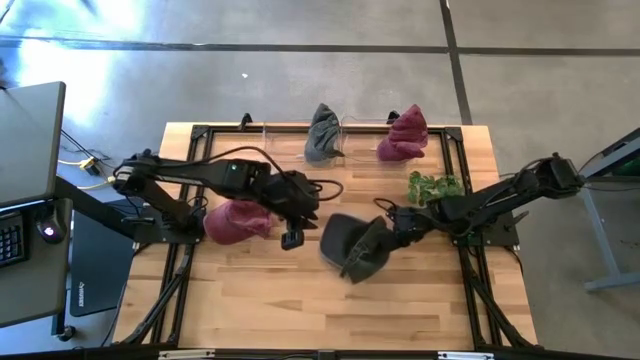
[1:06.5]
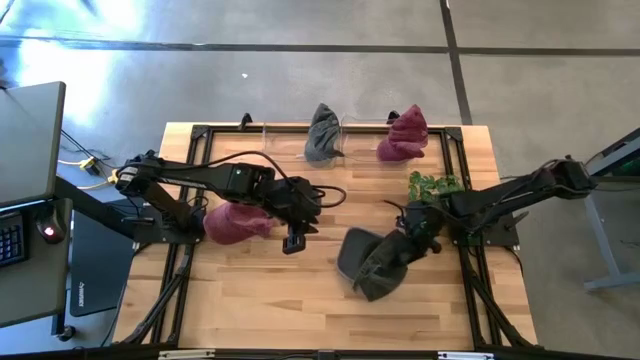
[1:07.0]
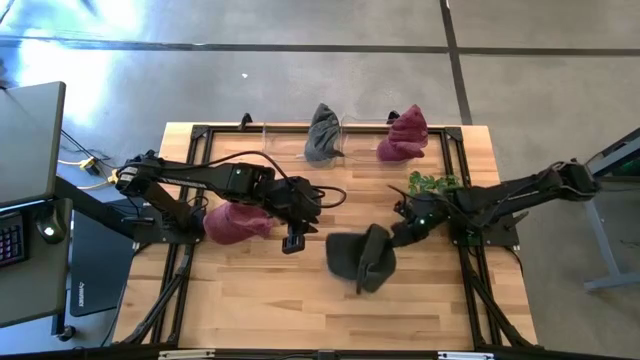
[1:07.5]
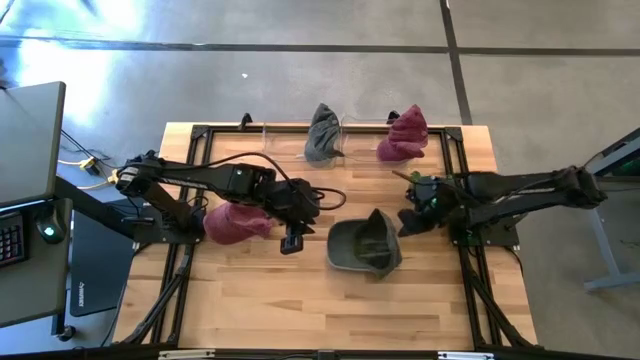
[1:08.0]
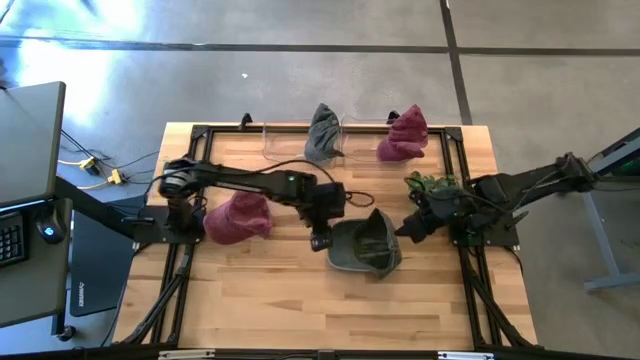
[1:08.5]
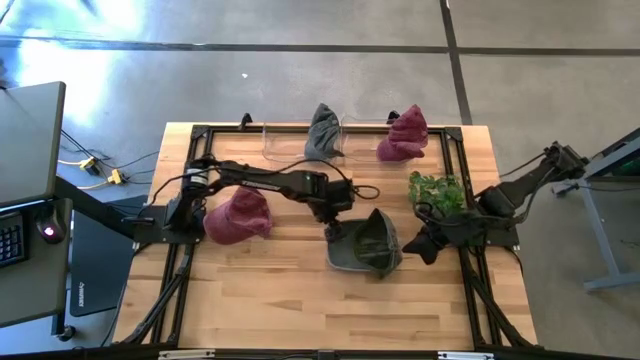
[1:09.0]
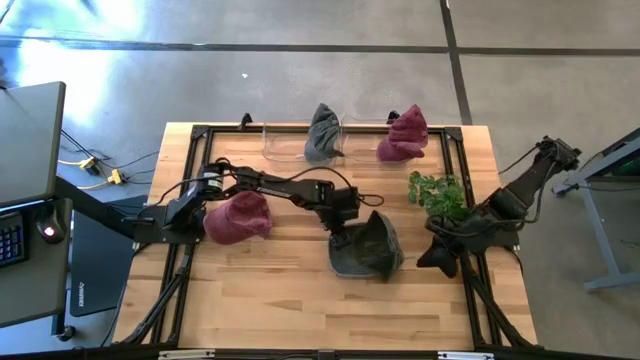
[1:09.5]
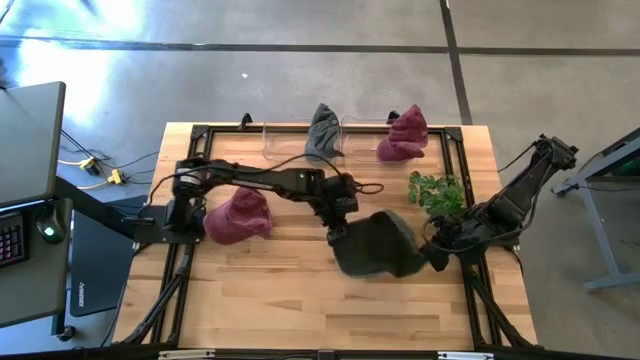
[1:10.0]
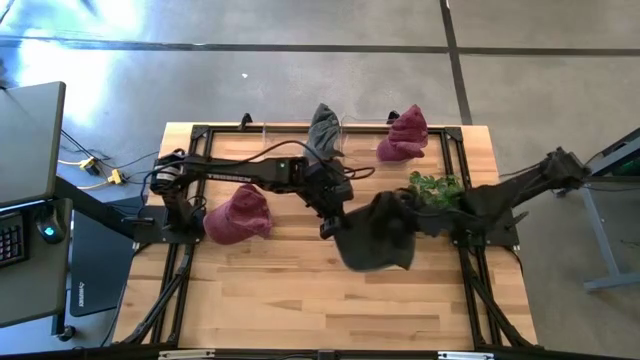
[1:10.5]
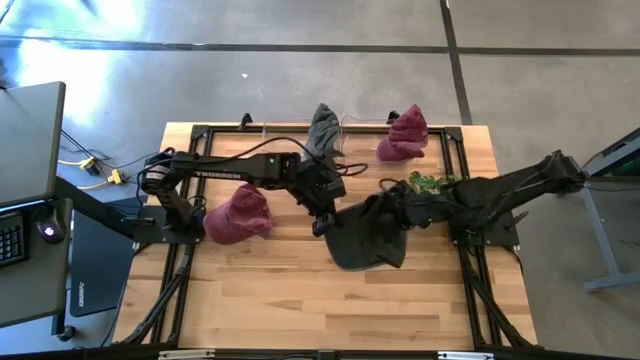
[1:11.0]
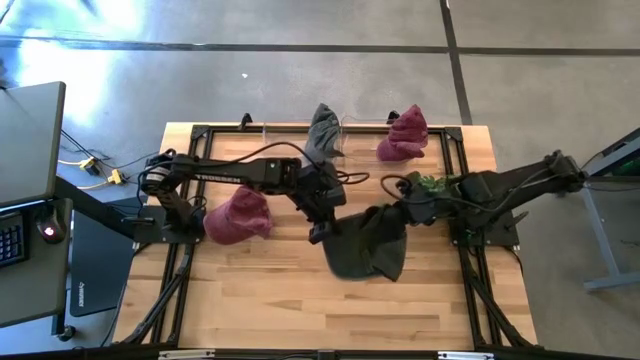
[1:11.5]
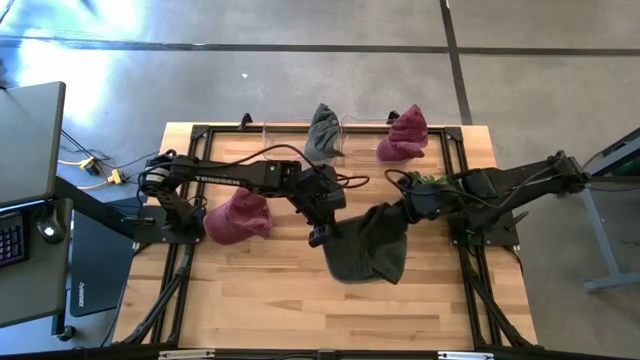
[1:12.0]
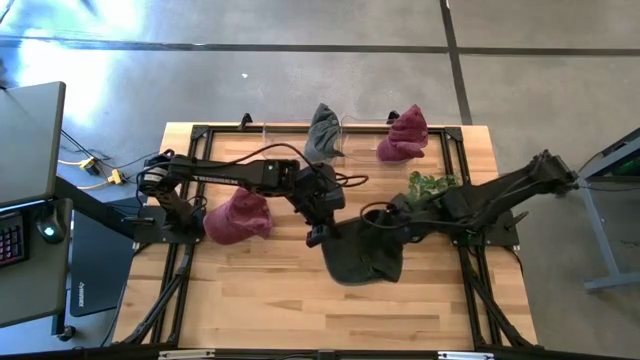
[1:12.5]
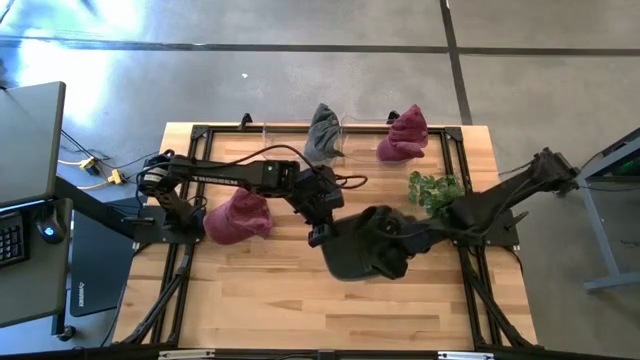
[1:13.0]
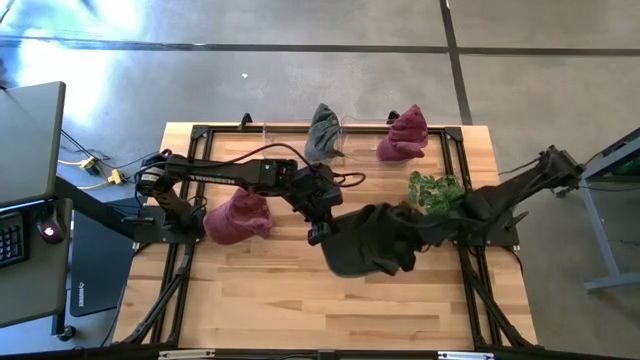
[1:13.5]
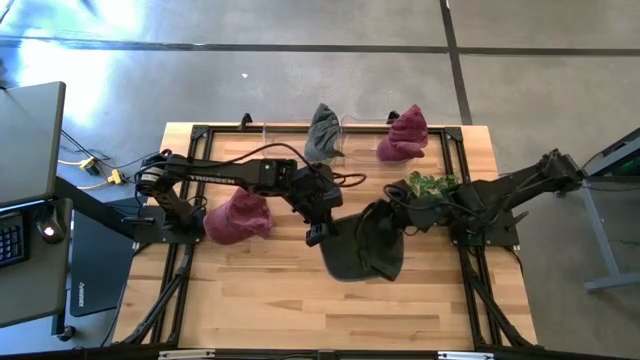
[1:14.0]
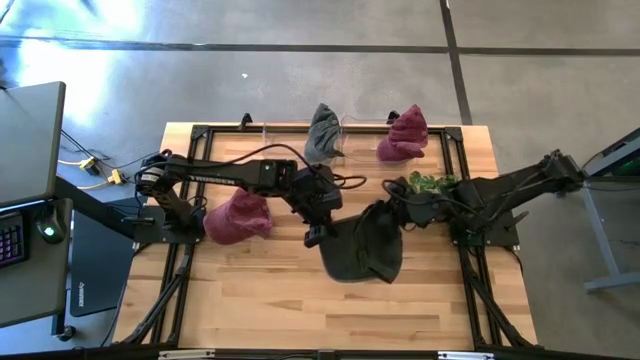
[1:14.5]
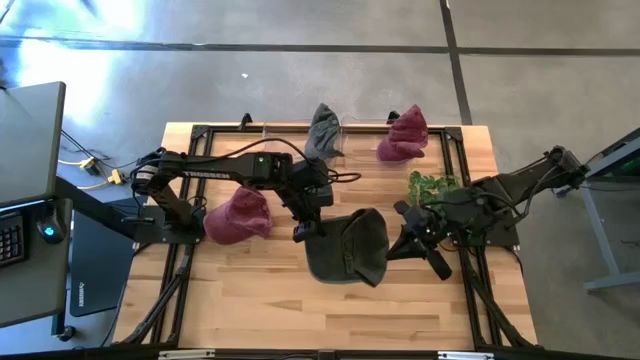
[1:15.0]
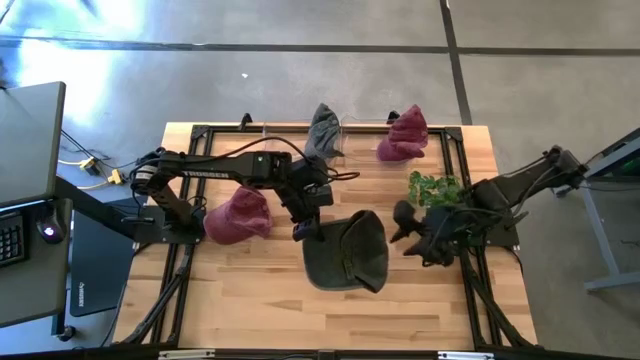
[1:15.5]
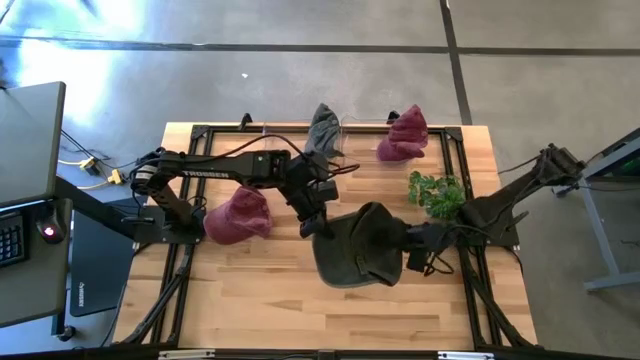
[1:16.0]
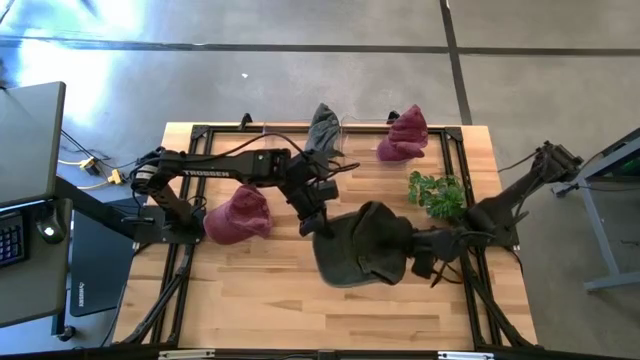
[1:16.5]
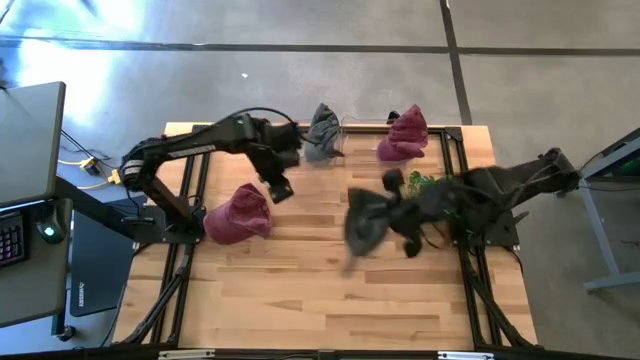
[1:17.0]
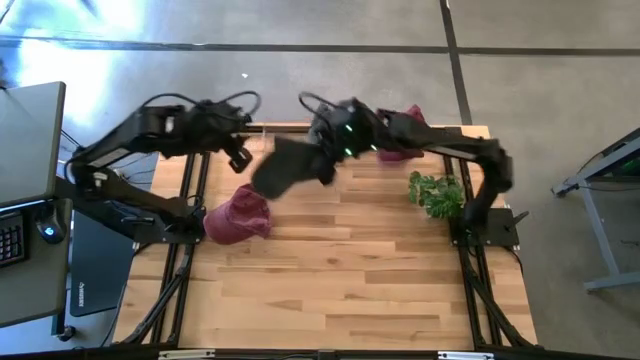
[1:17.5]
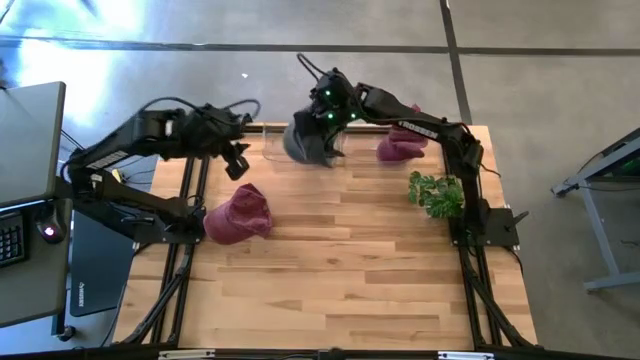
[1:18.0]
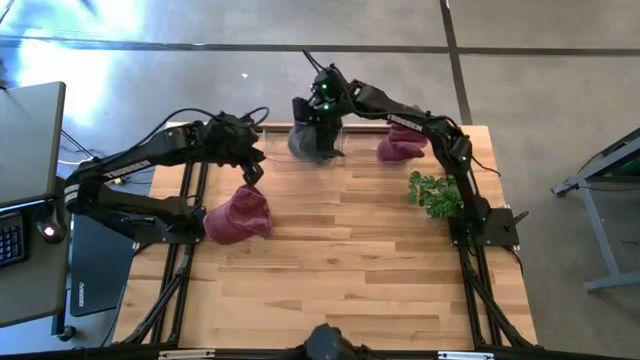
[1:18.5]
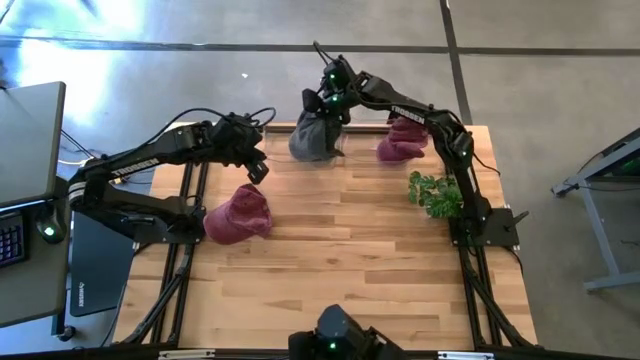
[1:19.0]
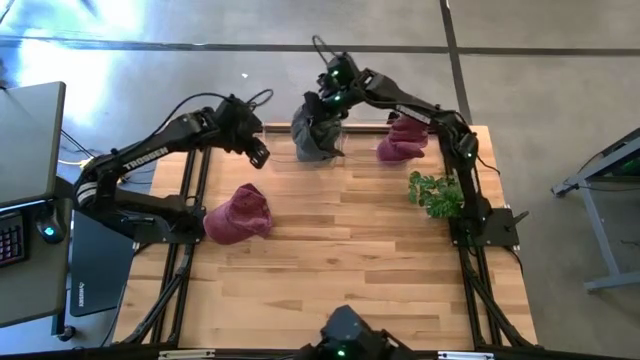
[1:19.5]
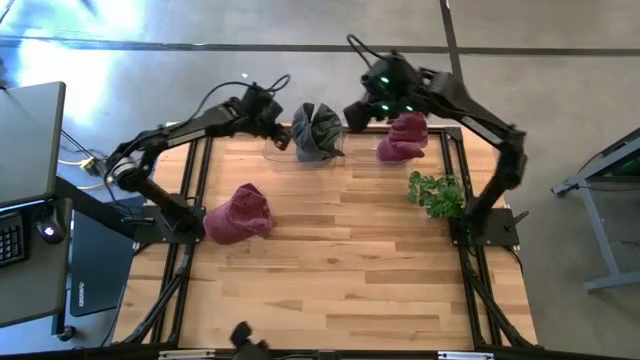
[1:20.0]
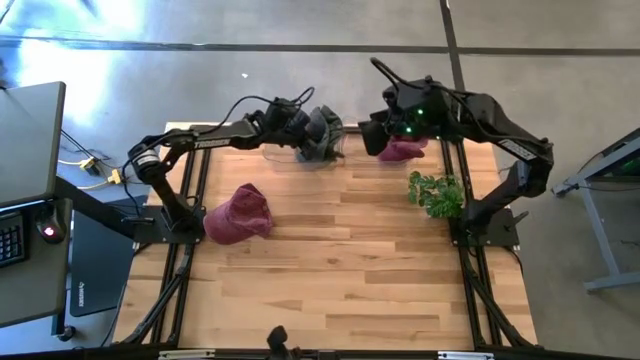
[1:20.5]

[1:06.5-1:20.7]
Task: Pick & Place hat
Put the gray cap into the left transparent bin

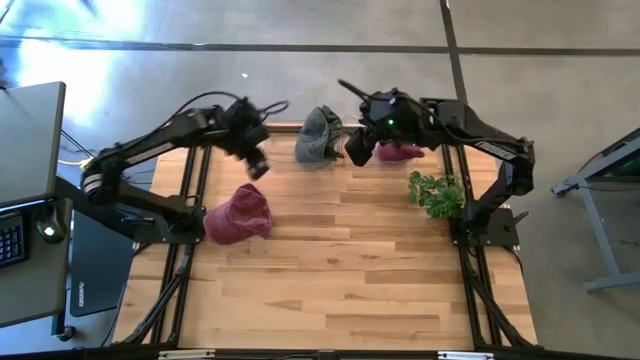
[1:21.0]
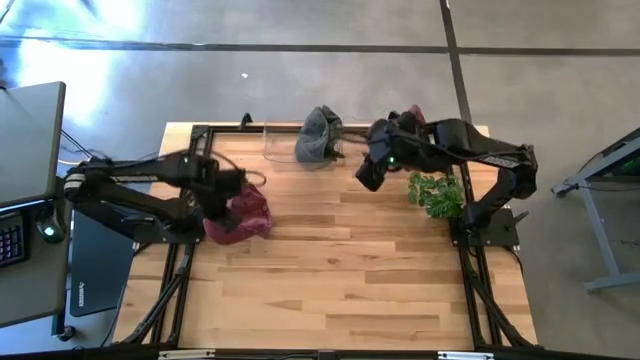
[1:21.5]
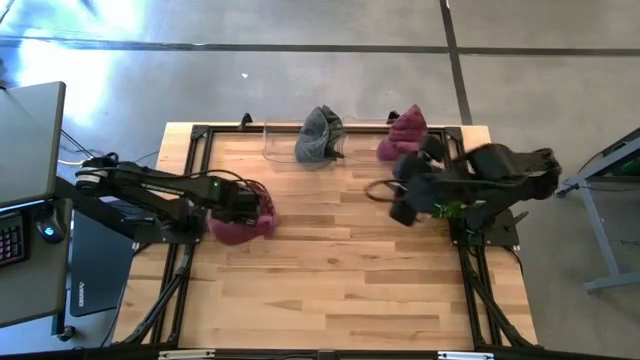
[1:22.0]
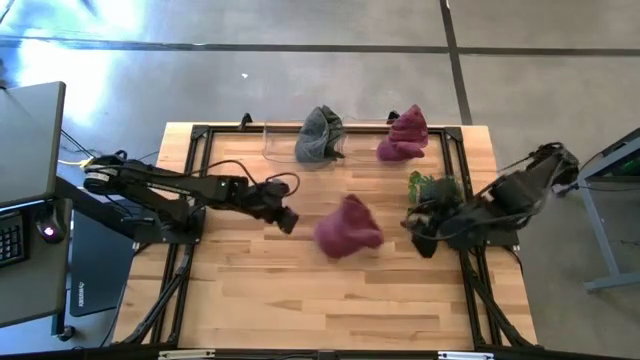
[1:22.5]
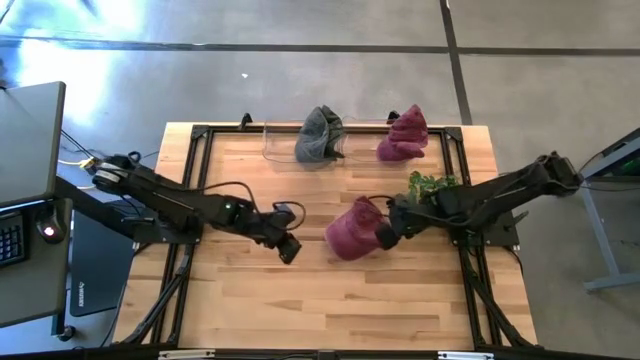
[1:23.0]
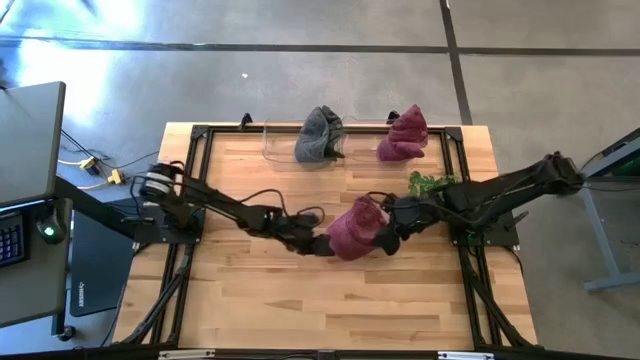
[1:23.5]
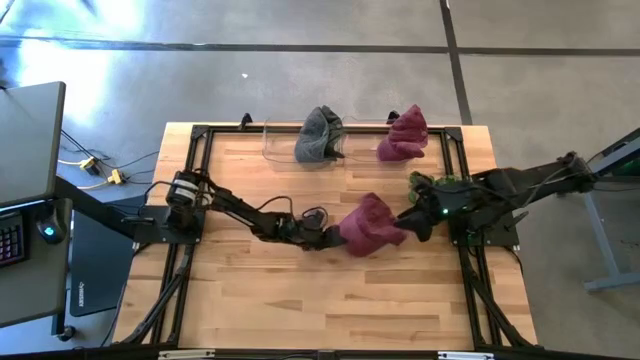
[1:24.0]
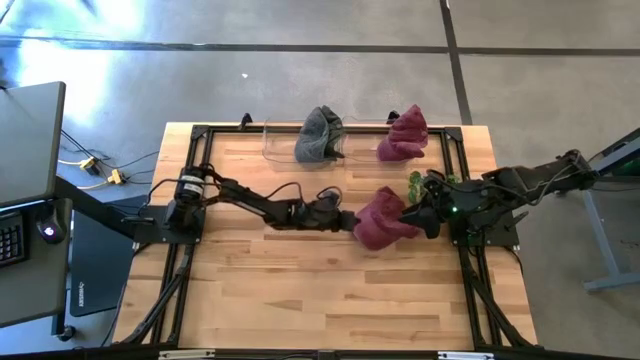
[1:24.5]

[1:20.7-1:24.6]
Put the red cap into the right transparent bin

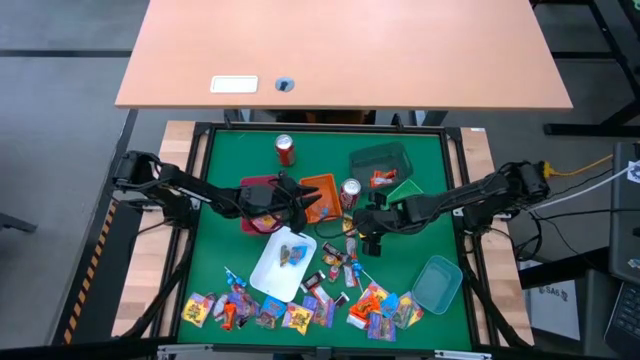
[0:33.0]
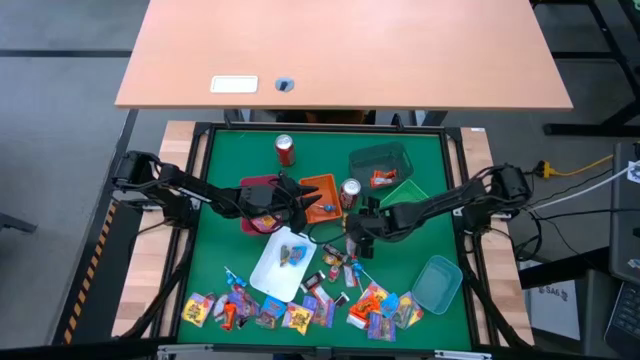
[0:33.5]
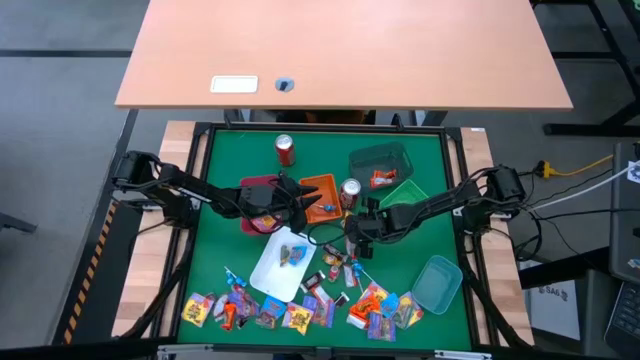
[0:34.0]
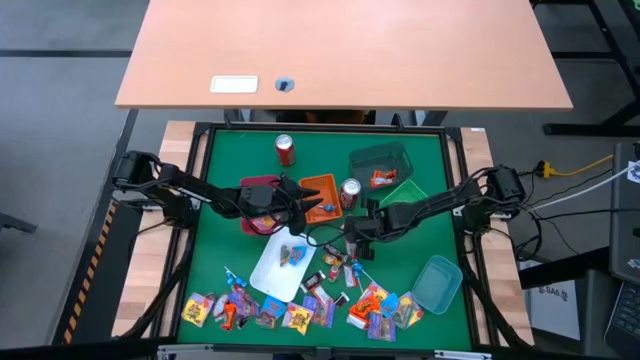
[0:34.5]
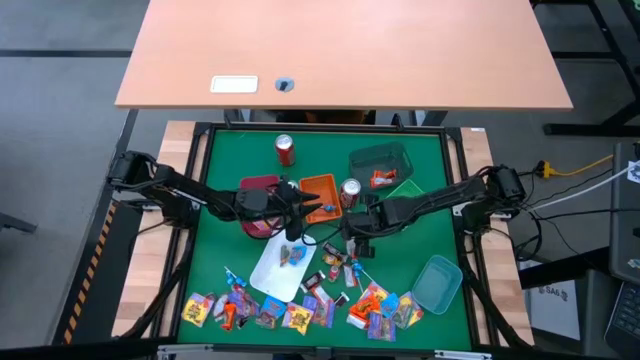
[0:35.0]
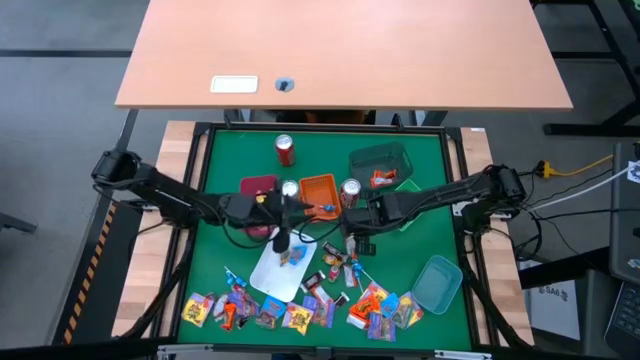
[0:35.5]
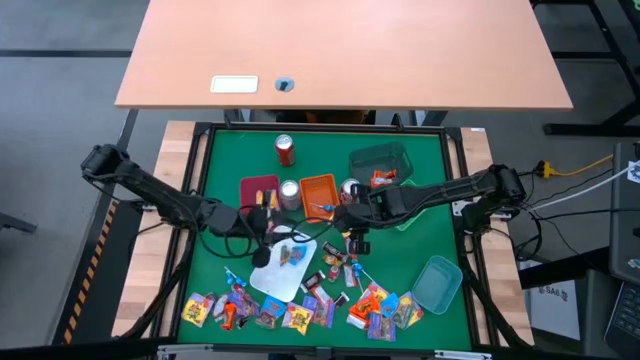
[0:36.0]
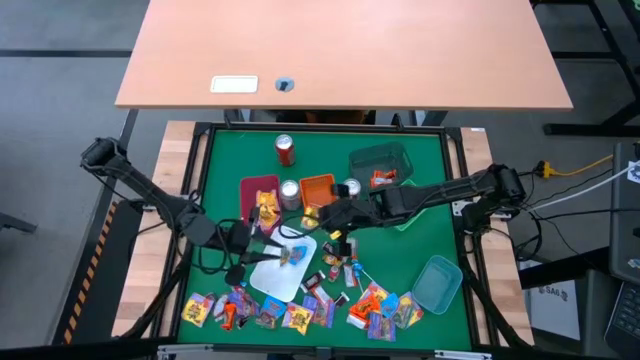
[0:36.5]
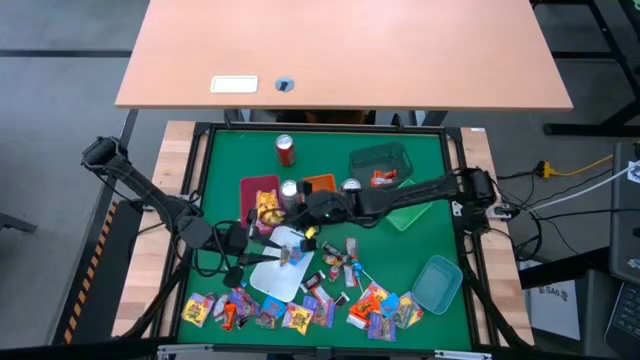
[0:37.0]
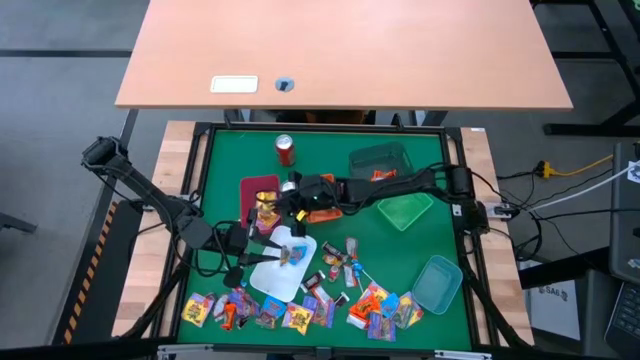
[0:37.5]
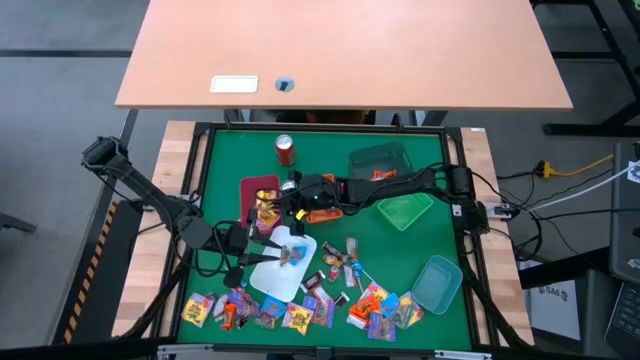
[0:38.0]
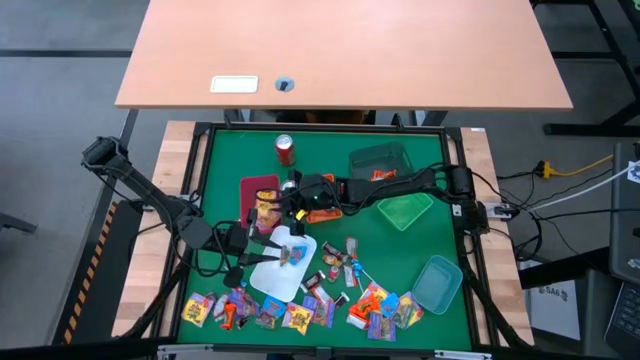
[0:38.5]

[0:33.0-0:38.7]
Task: Sort candy
Put the yellow candy pack into the red bin
